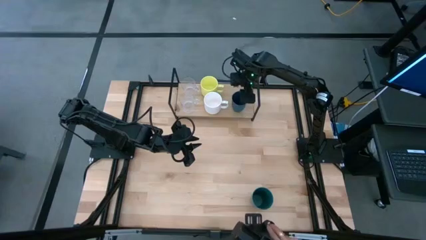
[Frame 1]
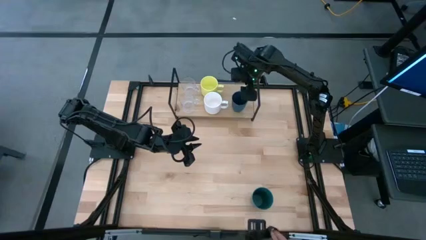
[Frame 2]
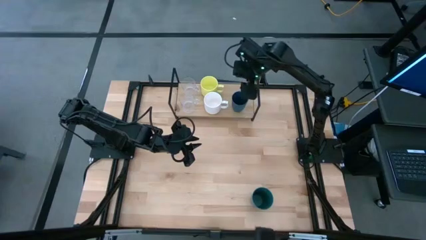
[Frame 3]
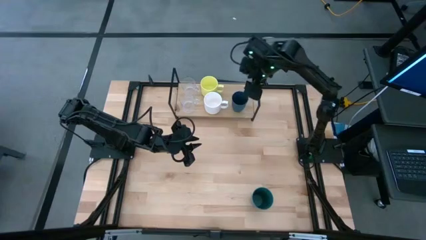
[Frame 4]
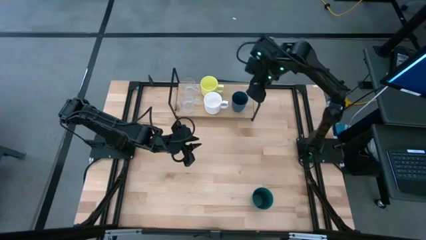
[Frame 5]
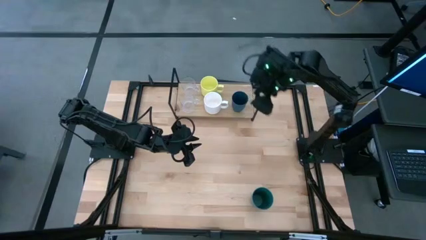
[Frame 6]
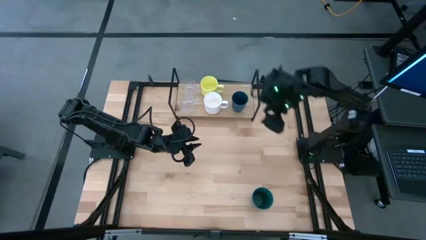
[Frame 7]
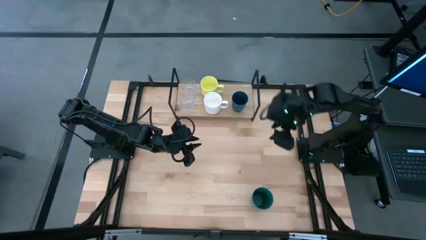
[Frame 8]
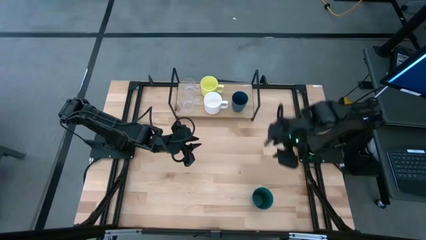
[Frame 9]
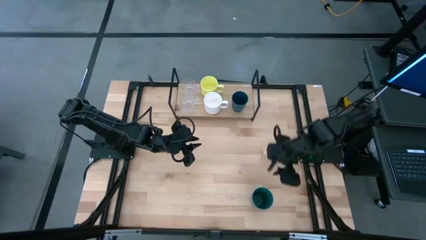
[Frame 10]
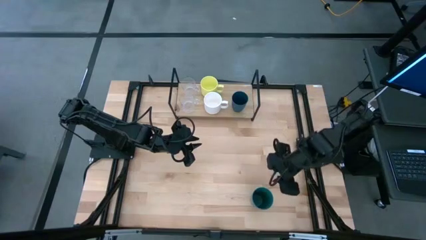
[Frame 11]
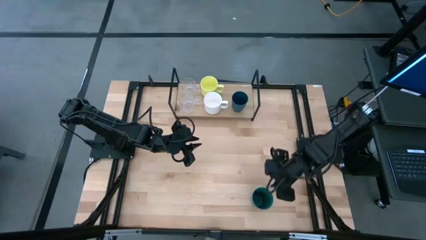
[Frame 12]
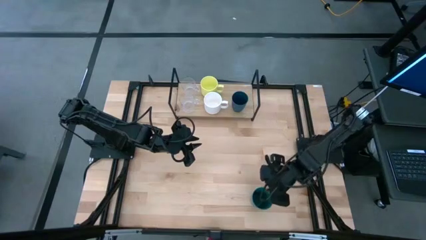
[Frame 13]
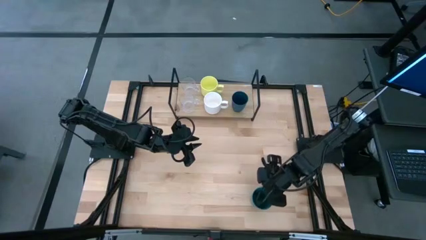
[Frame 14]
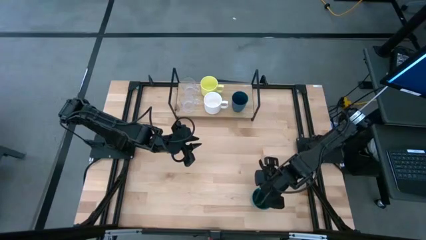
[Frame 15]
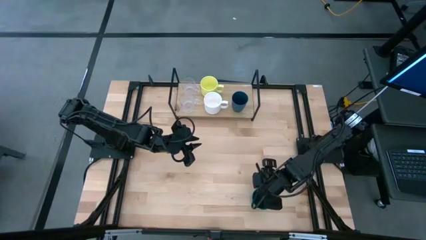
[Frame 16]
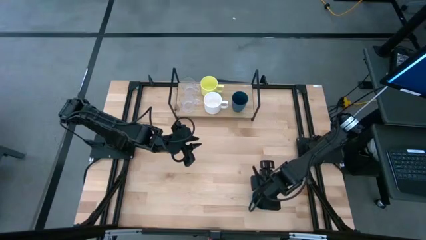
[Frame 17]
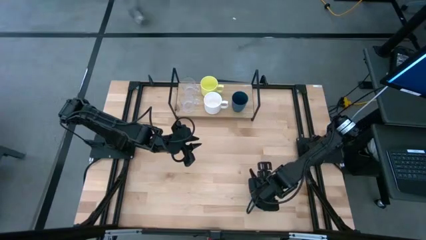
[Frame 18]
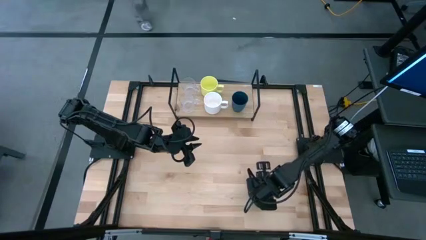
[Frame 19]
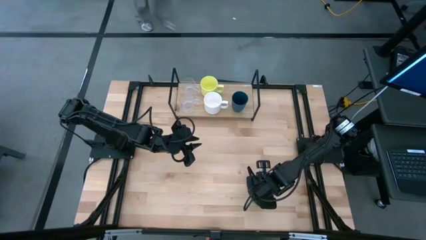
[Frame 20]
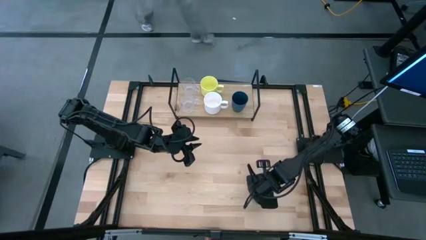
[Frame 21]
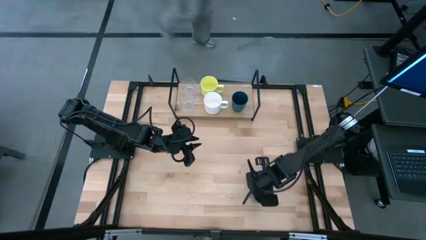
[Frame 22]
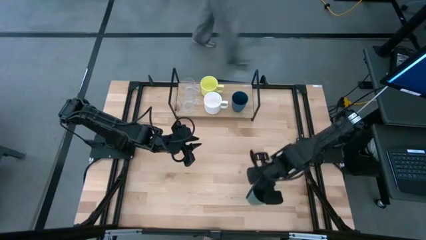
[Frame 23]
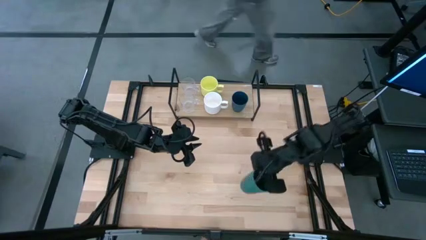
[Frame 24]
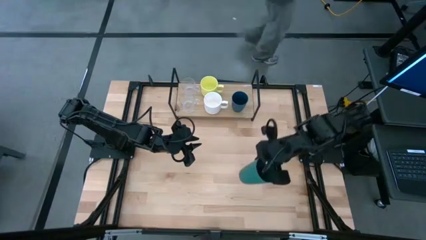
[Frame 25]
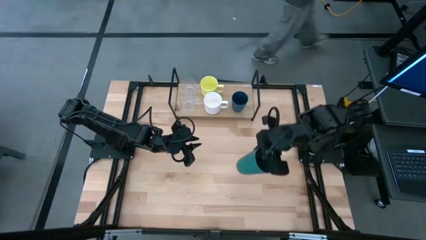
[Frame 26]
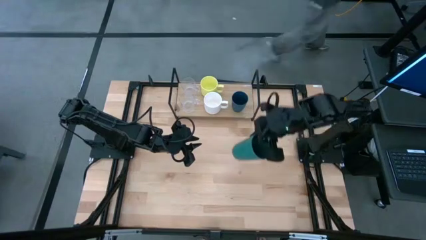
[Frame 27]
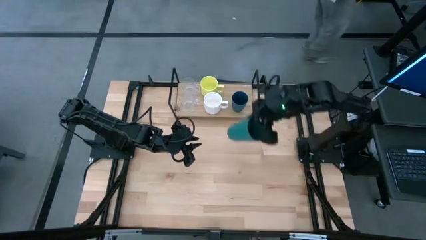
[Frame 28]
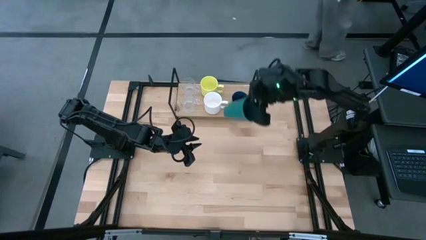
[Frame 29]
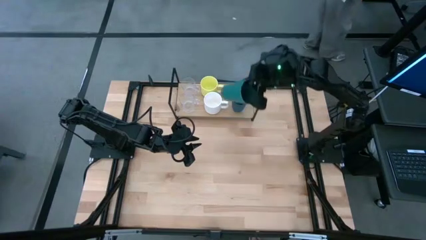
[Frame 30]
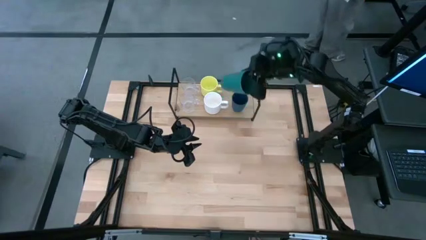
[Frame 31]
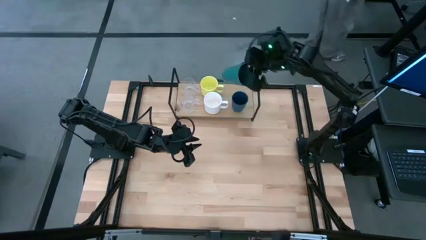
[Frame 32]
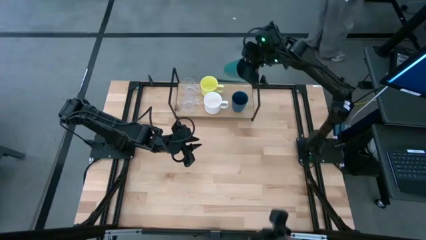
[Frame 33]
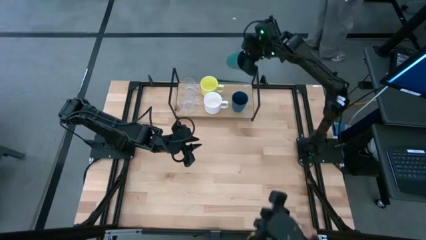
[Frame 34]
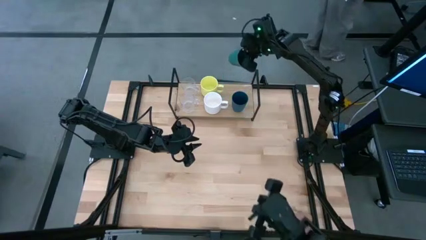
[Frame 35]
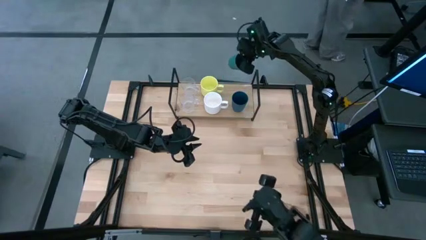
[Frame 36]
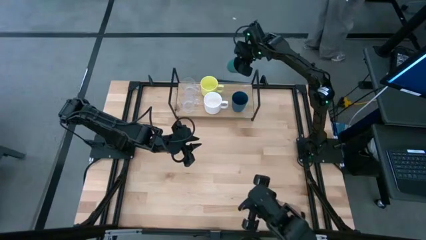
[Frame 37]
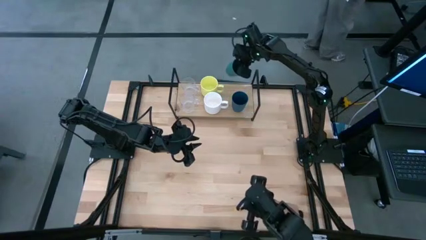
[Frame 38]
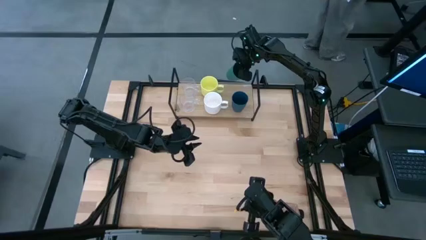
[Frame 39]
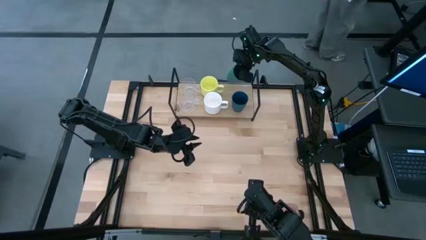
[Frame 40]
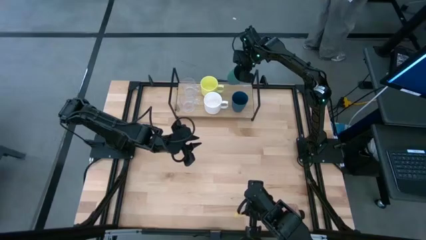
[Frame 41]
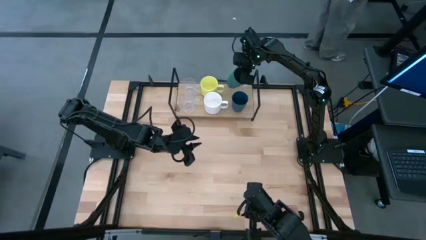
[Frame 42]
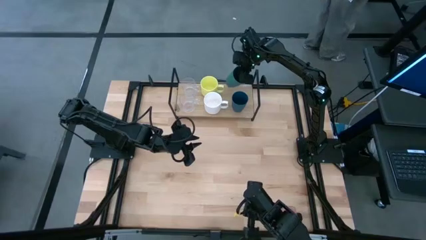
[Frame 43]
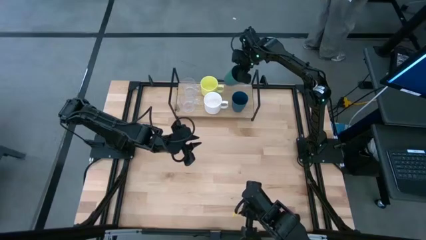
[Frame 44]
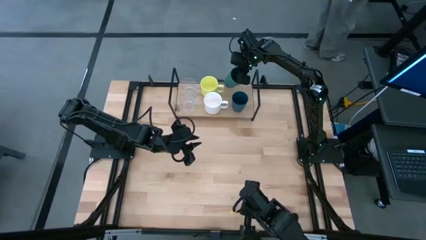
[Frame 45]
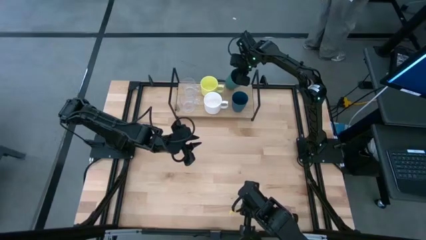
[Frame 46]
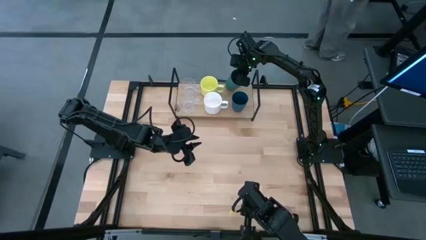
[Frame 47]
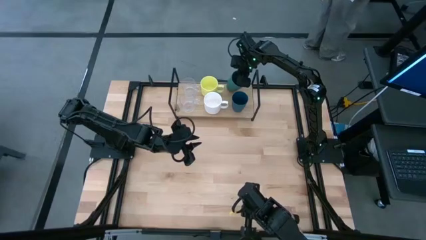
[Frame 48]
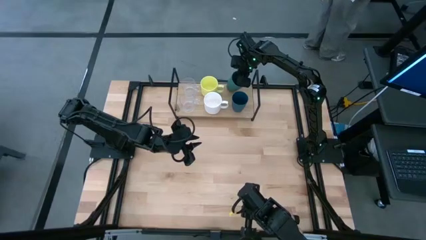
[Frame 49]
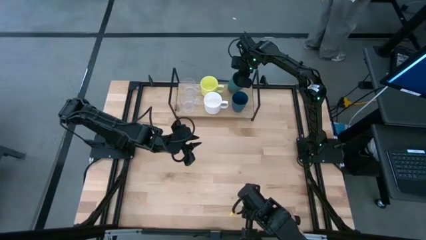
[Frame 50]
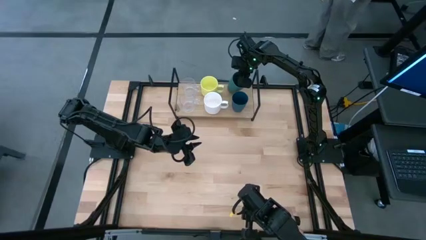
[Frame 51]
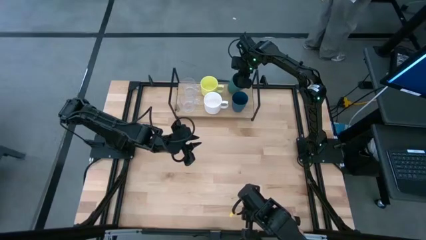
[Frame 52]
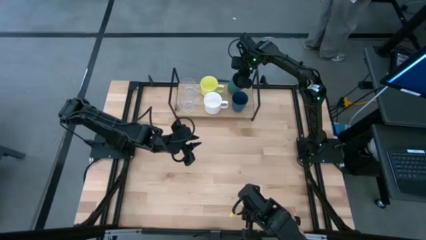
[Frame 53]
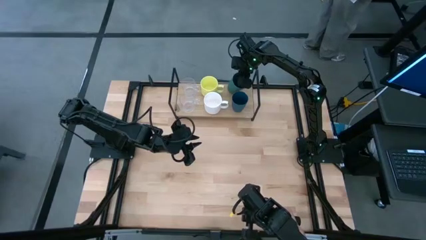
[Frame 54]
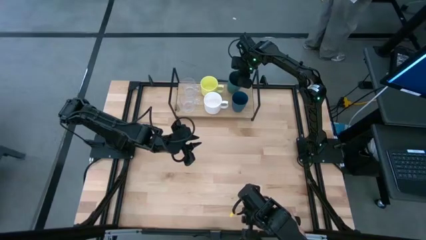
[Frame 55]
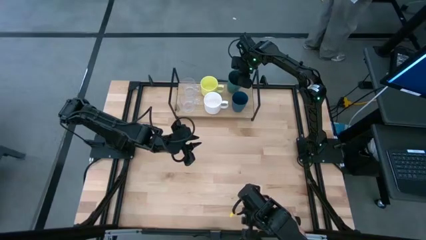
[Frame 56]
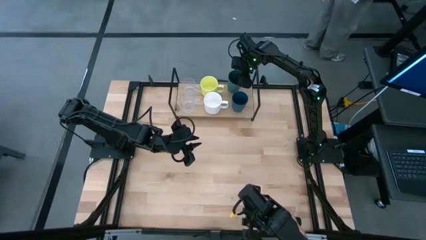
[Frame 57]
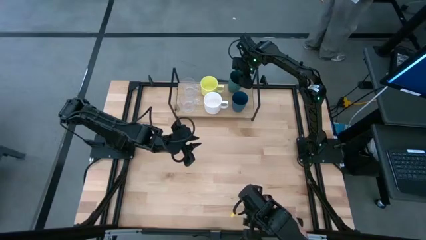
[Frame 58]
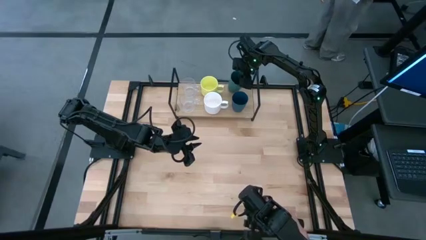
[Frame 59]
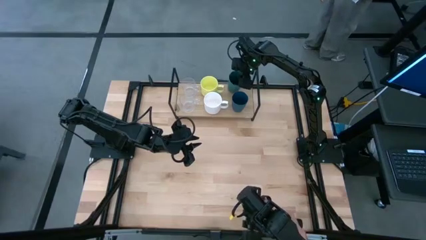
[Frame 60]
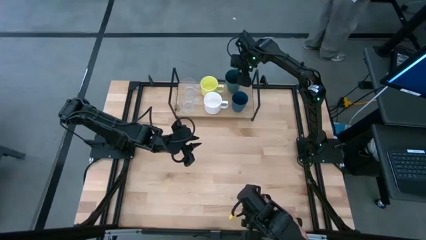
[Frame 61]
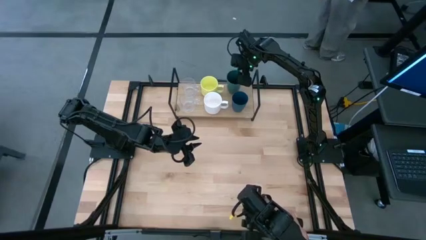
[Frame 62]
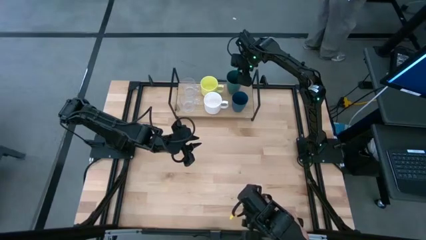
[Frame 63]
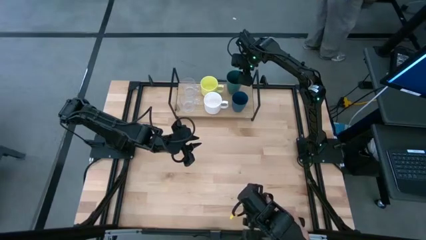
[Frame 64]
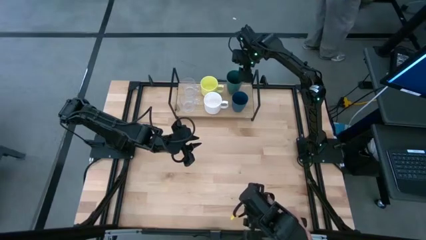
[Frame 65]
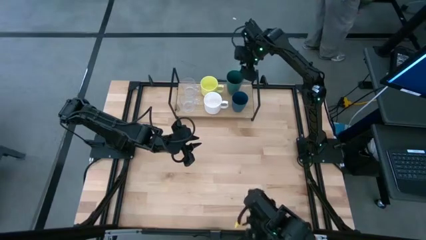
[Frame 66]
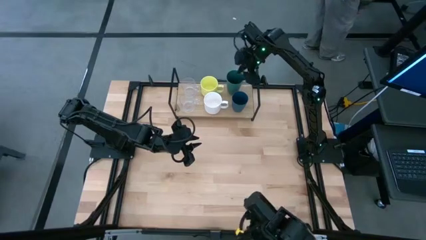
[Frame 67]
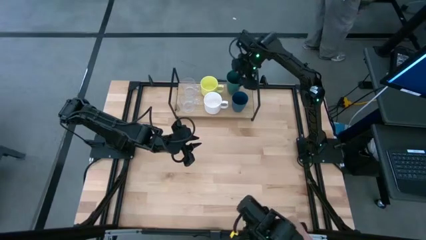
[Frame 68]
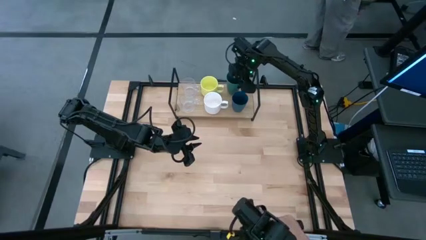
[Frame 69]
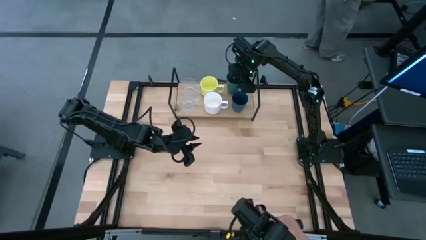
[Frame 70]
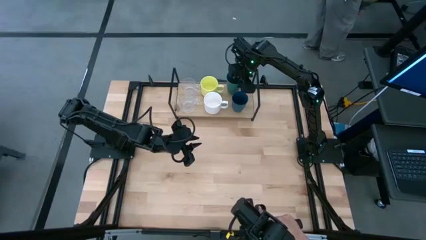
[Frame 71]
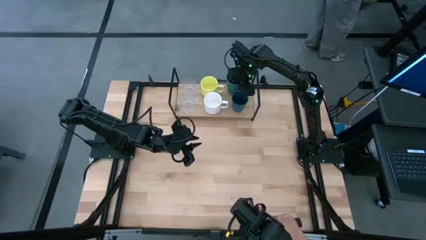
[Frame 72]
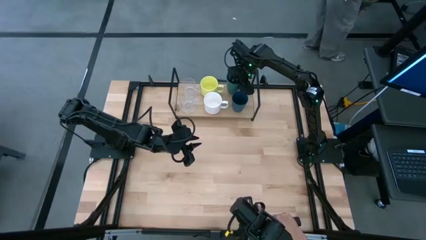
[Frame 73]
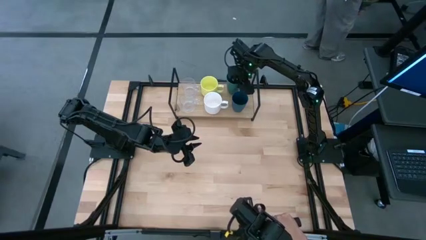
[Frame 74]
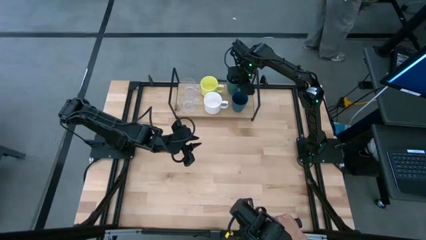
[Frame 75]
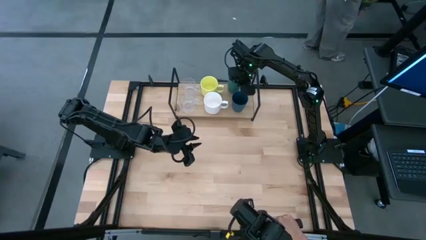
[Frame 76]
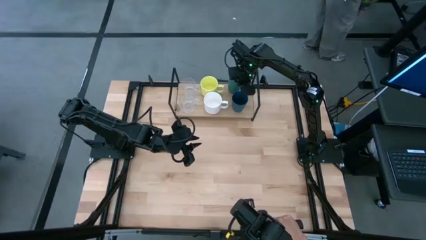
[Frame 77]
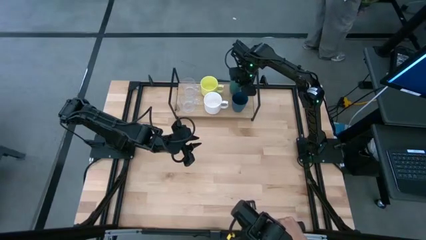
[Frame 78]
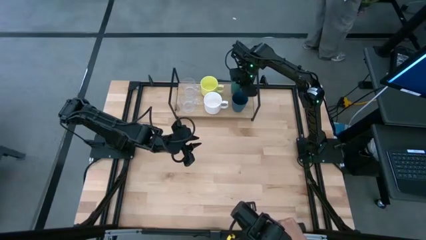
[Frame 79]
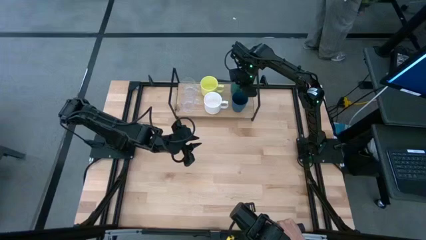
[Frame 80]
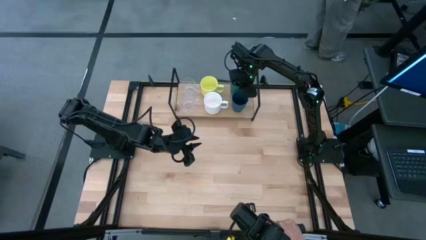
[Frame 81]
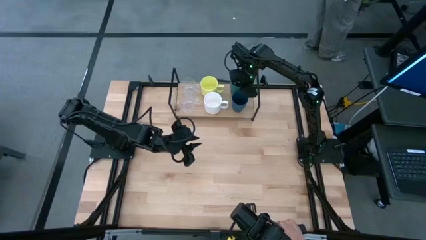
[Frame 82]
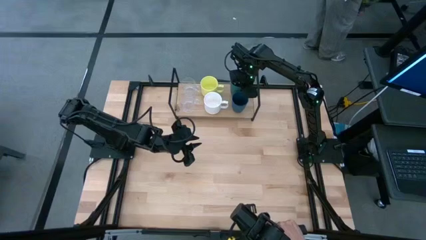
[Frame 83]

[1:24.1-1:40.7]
Task: Stack small to large cups/mugs on shelf
Put the green cup on the shelf
